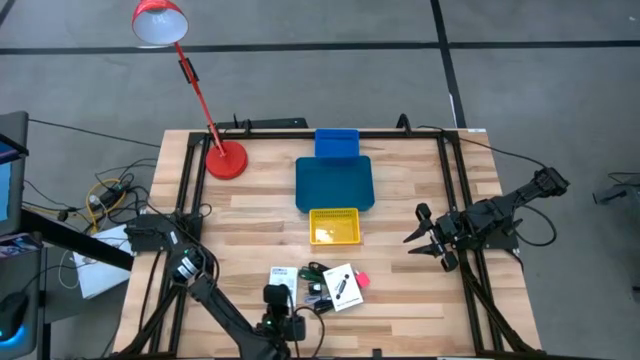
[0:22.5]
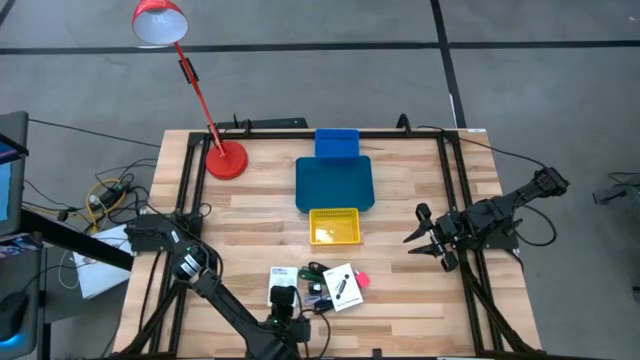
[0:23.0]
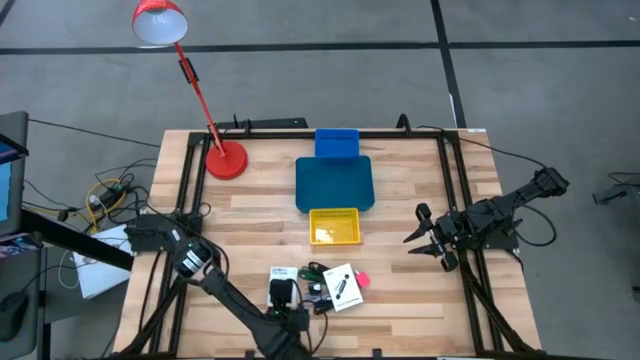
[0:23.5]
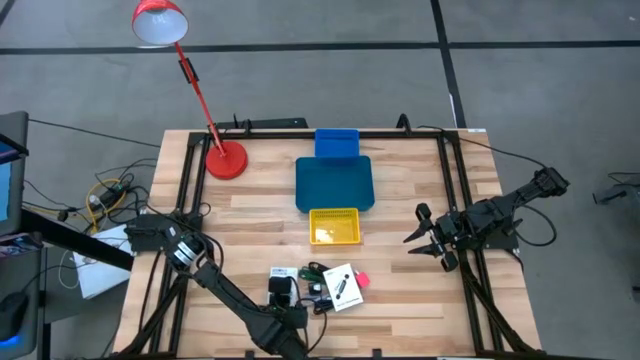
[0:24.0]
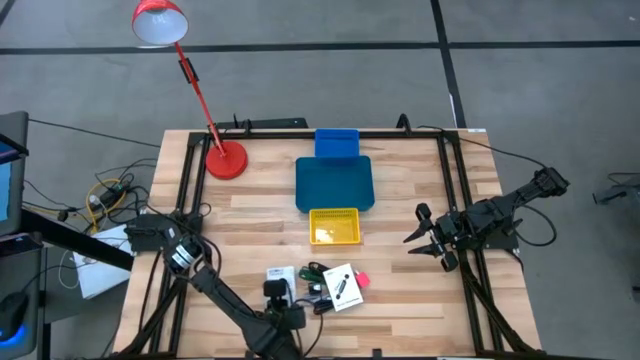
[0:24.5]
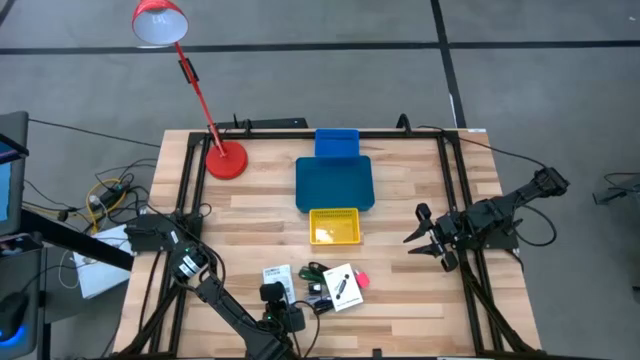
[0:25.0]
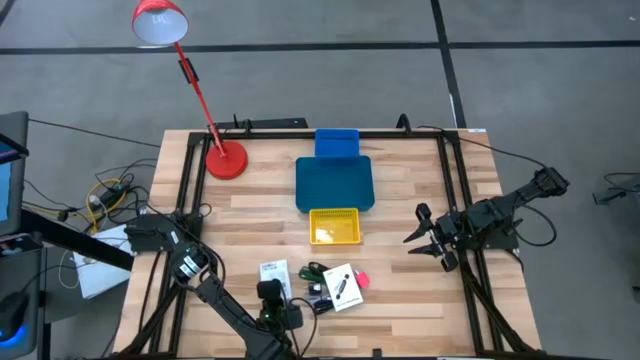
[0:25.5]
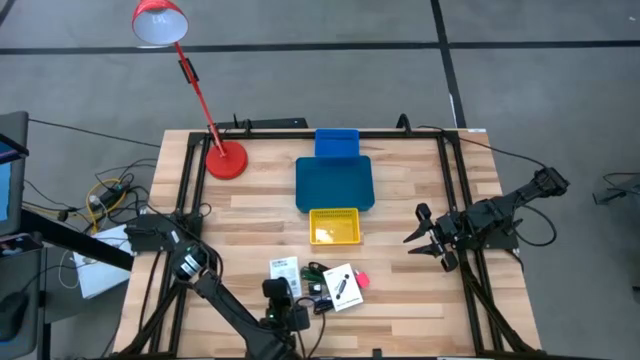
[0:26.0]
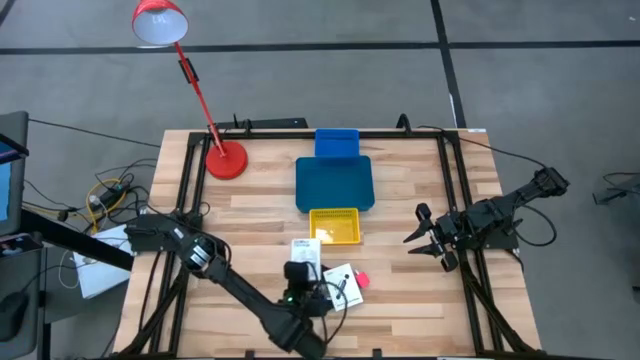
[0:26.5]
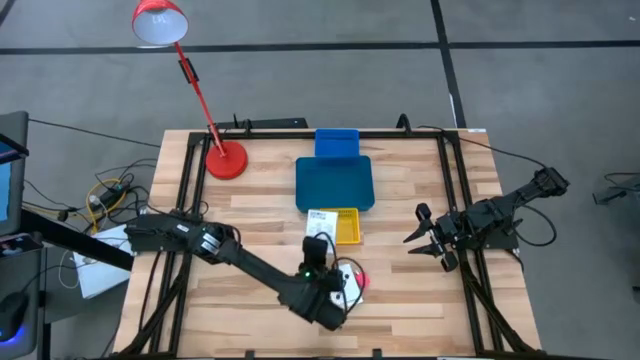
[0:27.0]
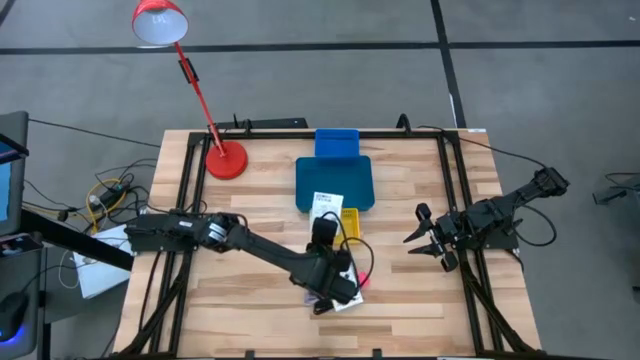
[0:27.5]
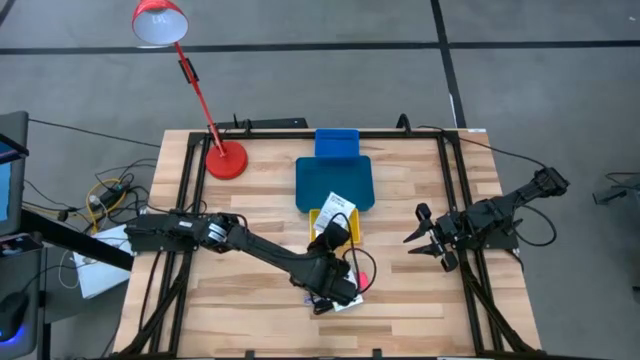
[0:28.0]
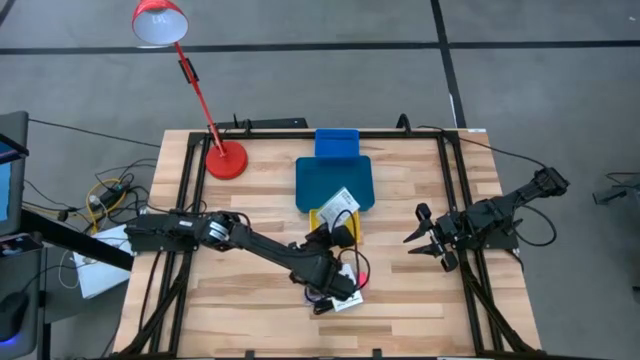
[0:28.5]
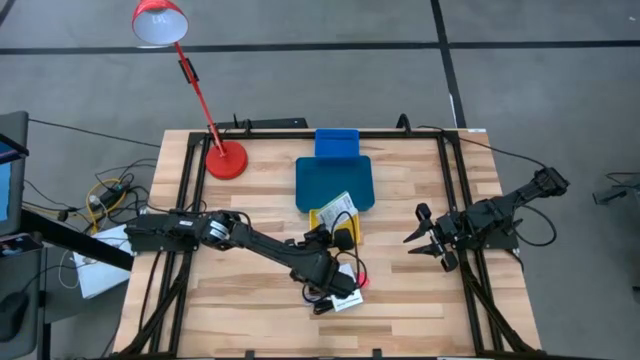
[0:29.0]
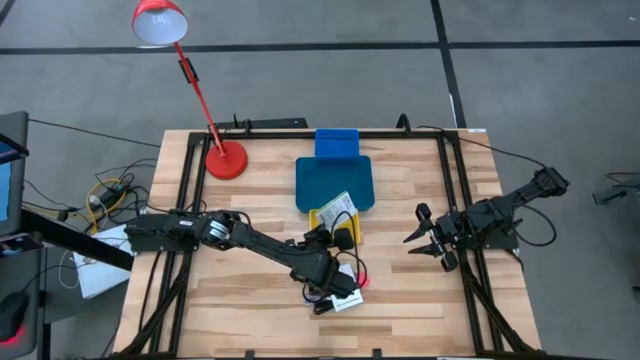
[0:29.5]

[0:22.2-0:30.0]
Task: Pick and place items into bin
Put the right white card reader box into the yellow basket

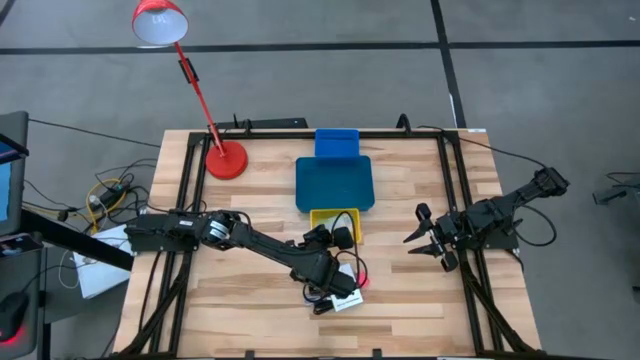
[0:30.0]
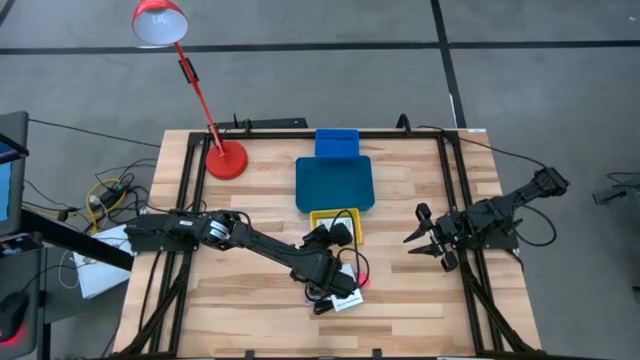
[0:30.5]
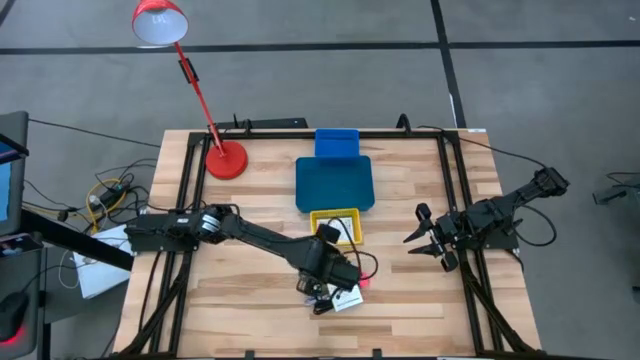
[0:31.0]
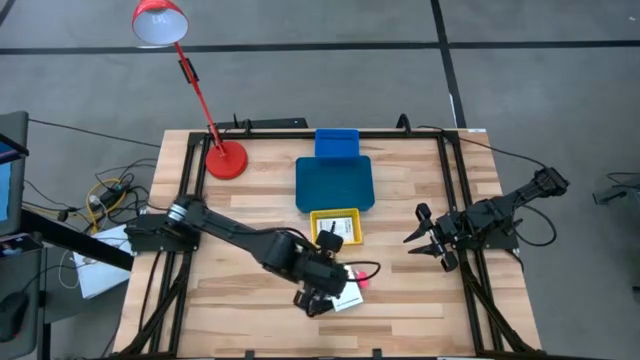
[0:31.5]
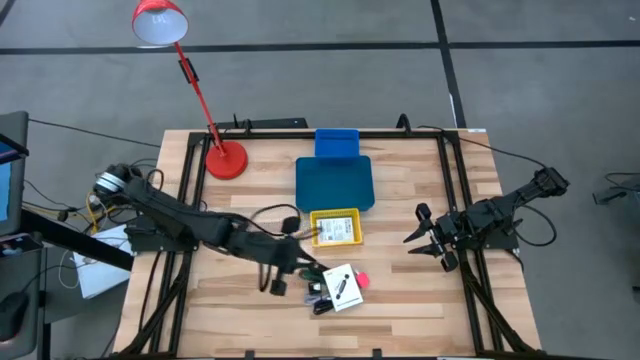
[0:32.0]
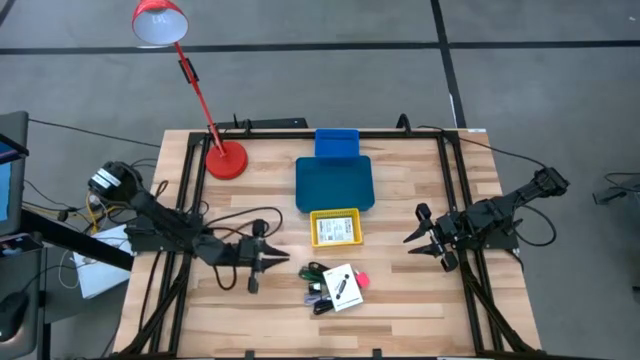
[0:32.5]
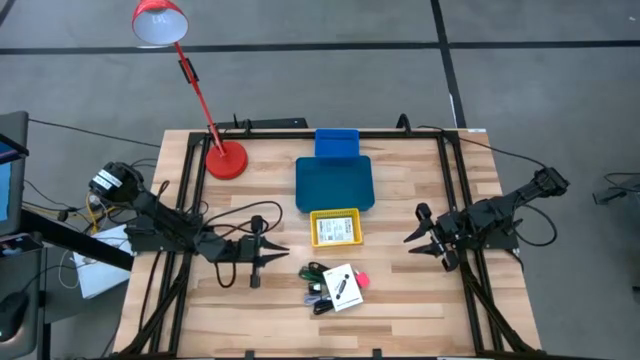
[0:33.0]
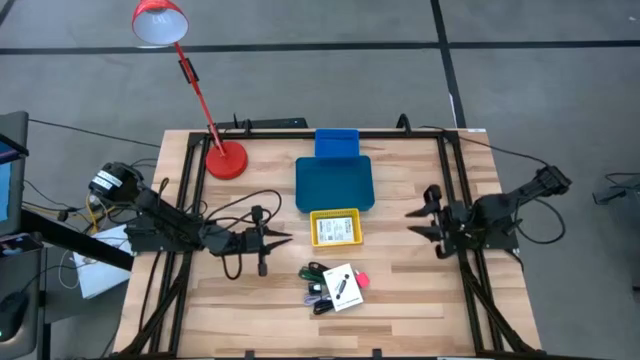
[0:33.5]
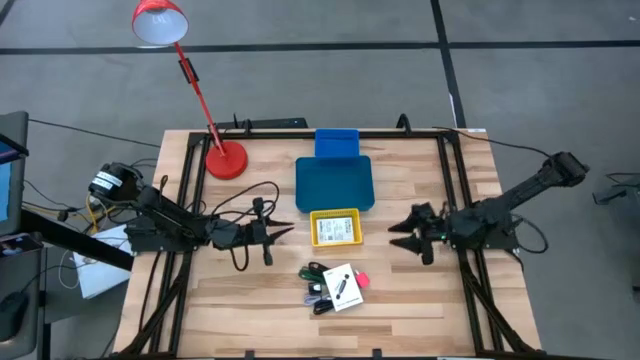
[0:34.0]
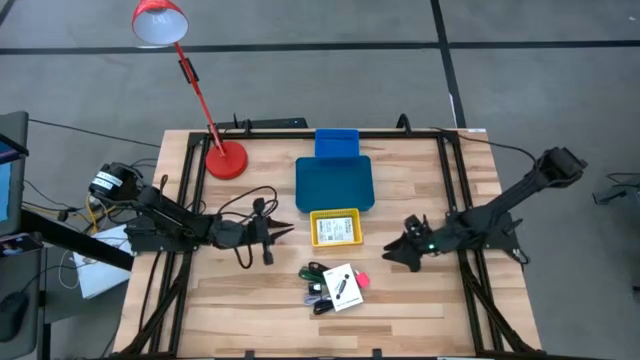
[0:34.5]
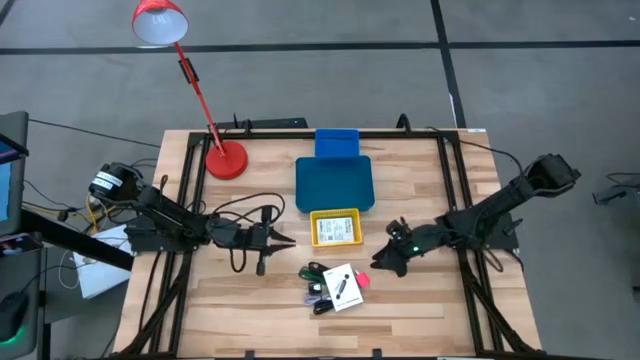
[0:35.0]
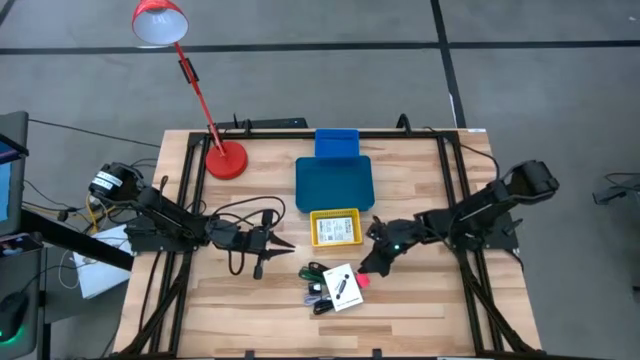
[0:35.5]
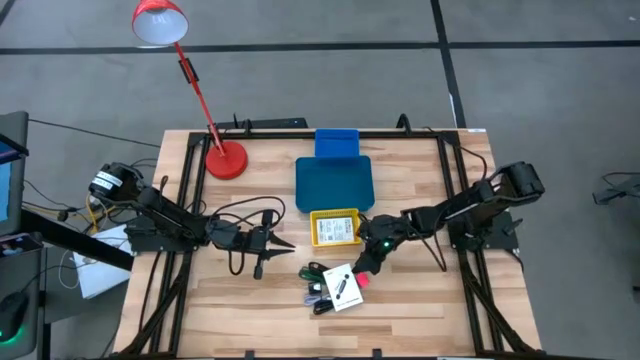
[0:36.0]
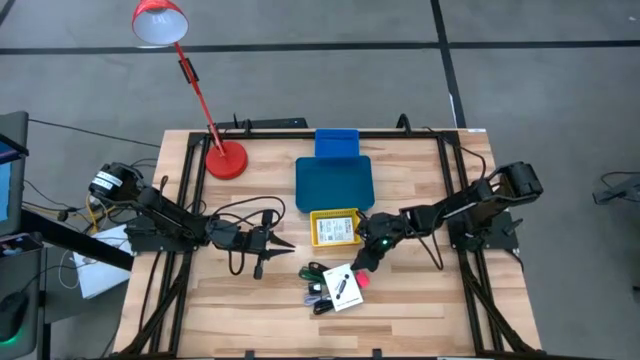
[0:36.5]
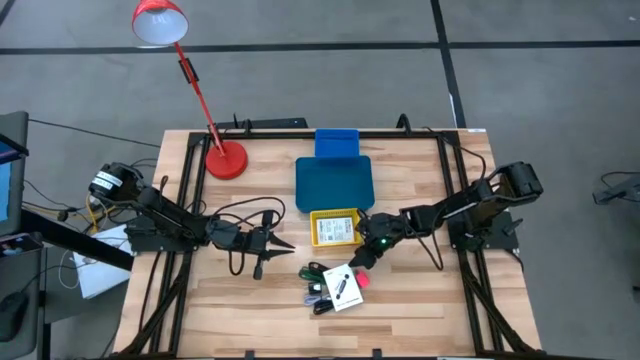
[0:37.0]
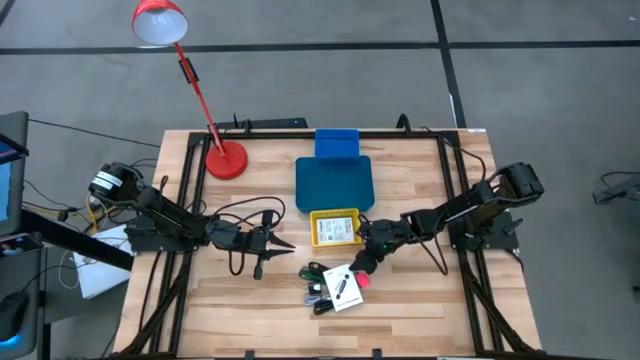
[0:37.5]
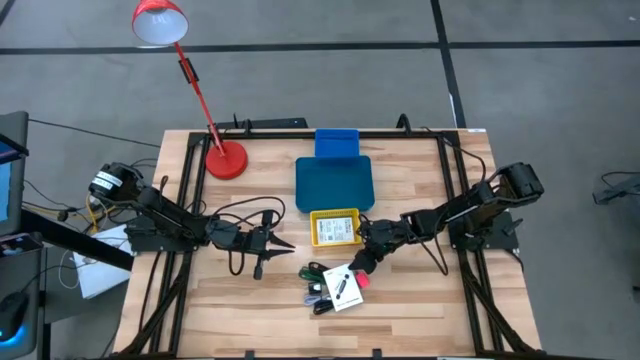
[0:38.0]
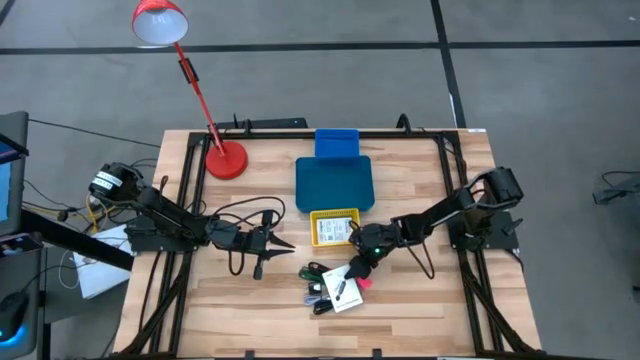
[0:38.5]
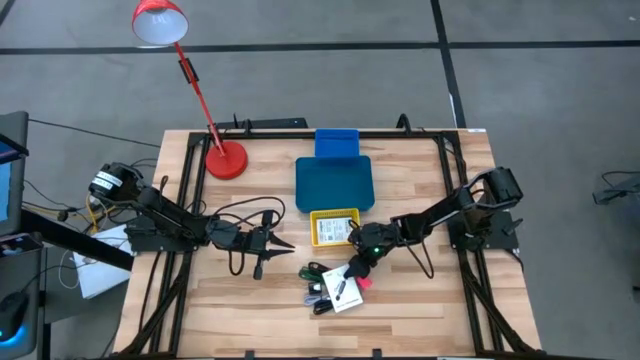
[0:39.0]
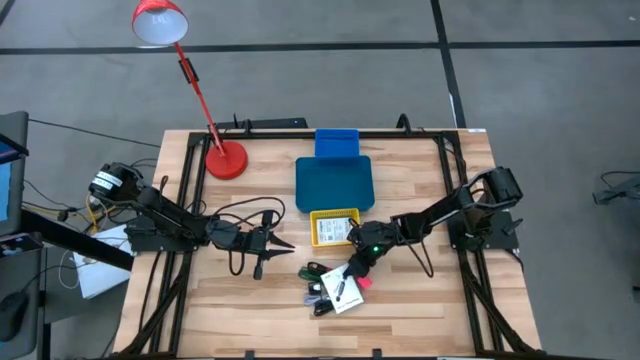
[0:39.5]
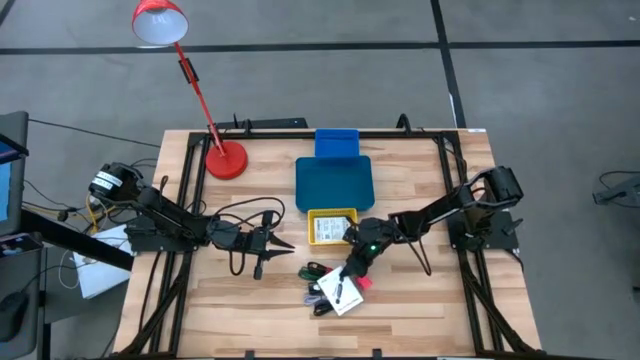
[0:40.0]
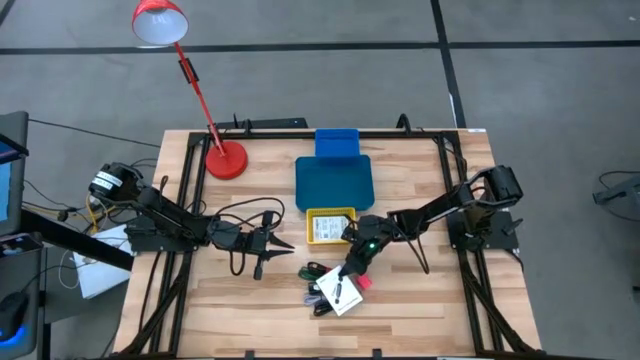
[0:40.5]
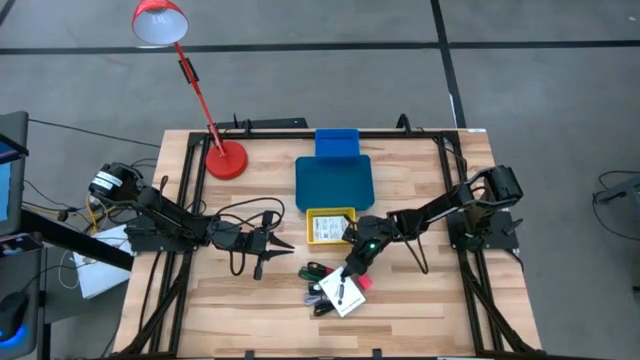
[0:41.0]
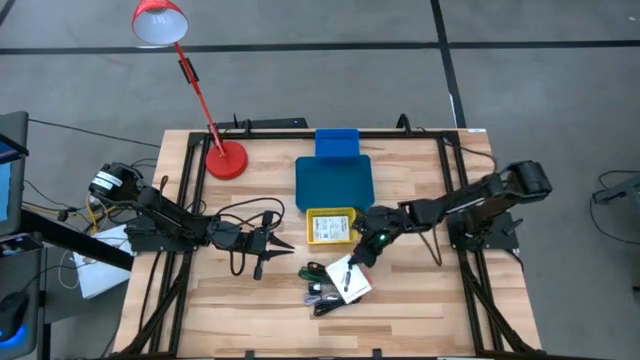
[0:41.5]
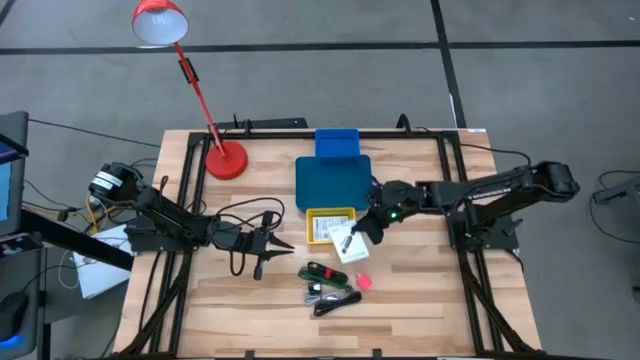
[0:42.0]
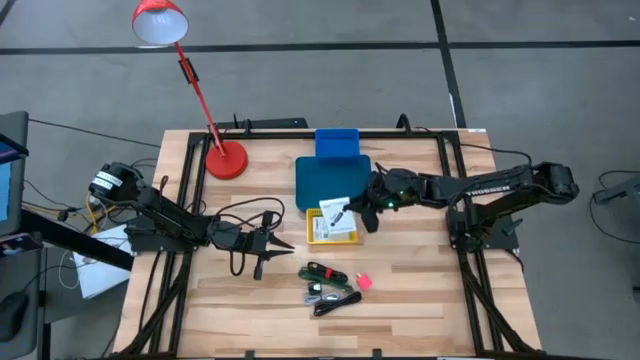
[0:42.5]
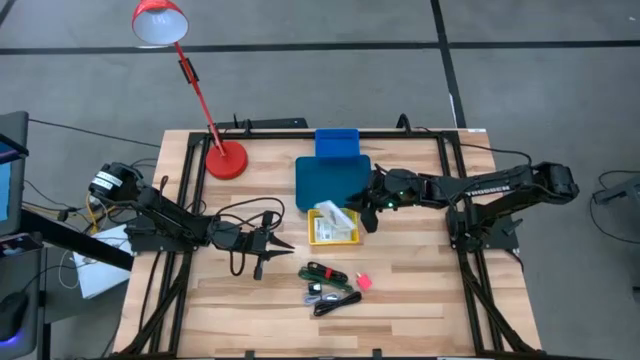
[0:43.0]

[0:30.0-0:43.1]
Put the white card reader box into the yellow basket
